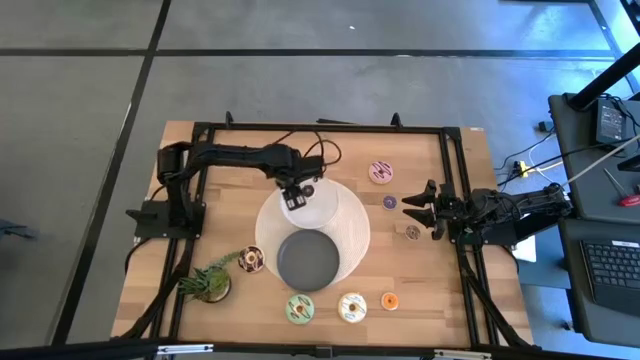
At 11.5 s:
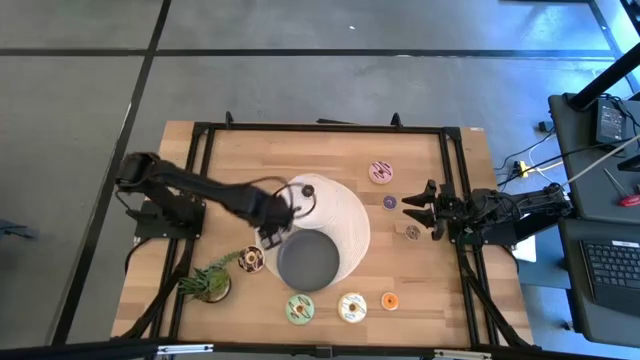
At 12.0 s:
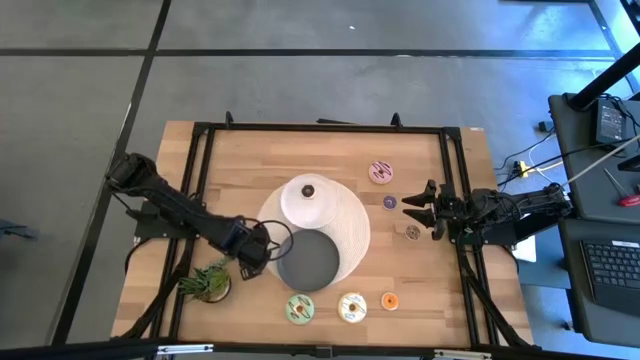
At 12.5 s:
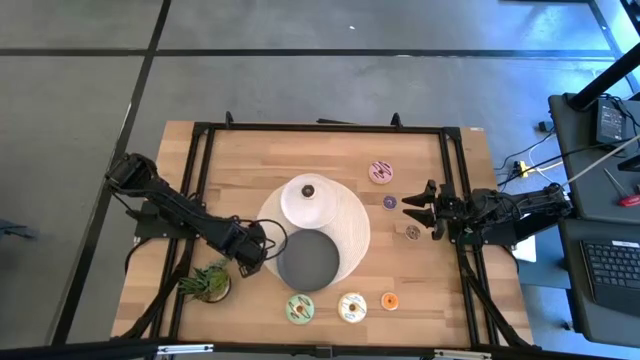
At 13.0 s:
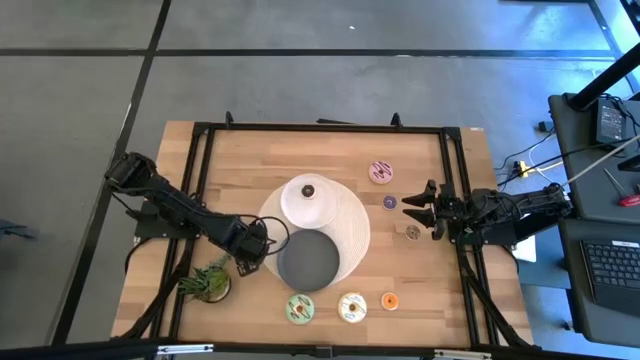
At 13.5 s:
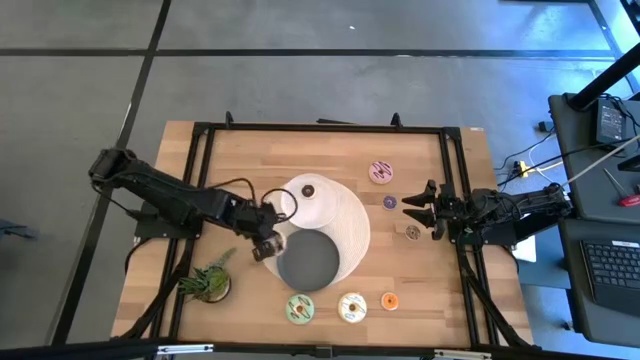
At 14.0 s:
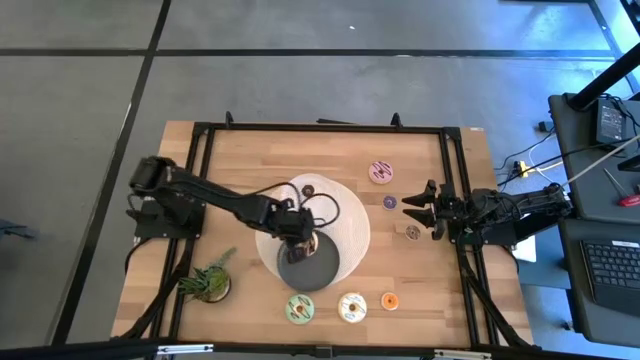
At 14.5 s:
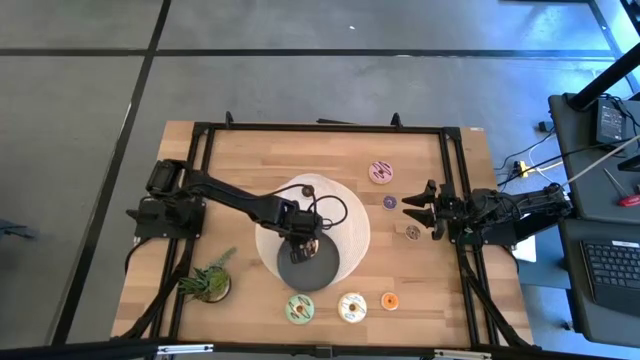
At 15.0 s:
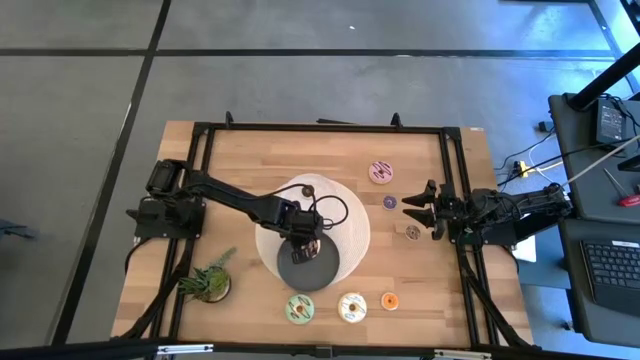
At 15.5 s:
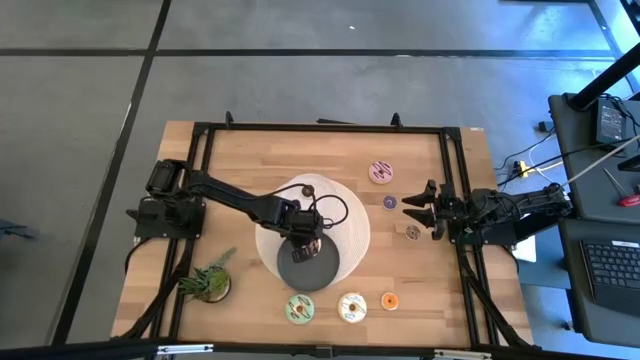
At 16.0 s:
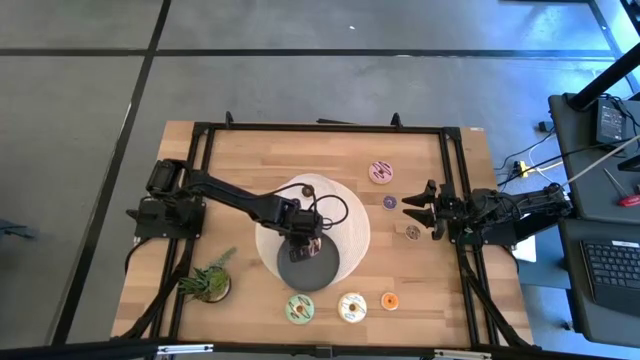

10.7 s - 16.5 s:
Task: Pick & Place donuts
Put the large black donut on the black plate

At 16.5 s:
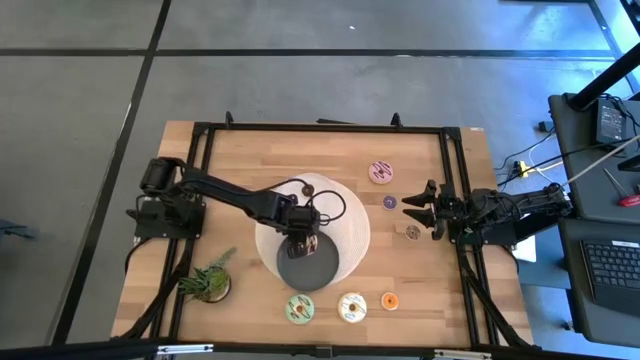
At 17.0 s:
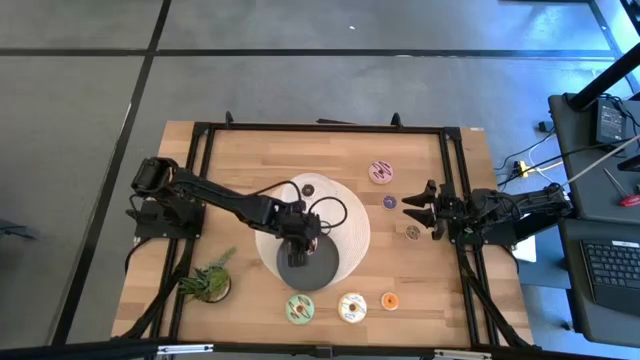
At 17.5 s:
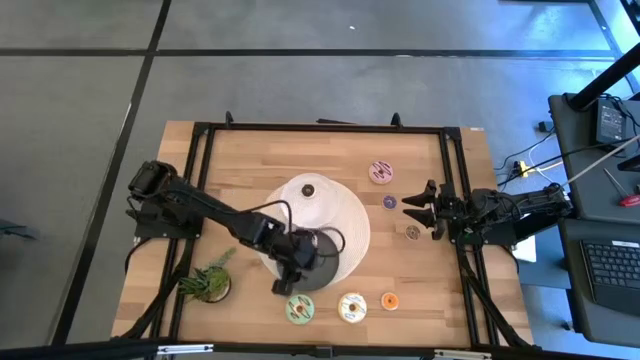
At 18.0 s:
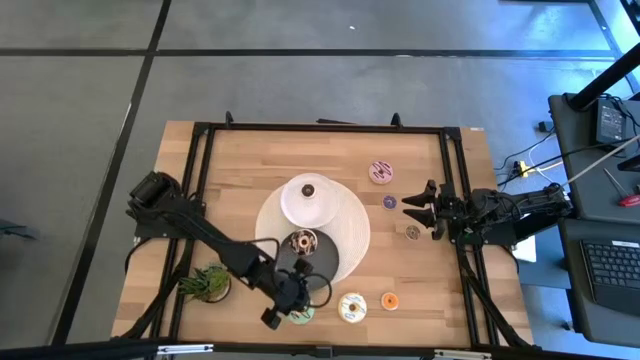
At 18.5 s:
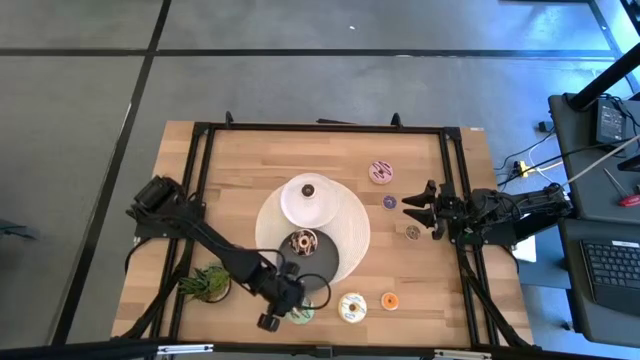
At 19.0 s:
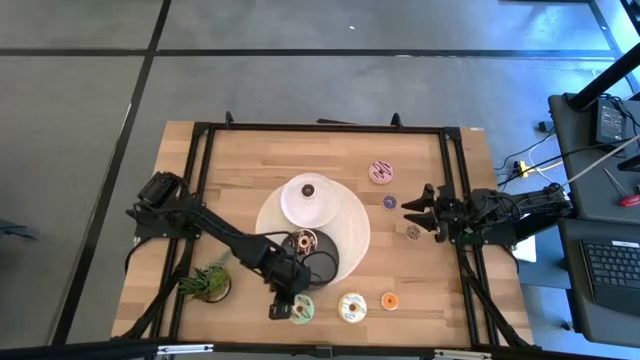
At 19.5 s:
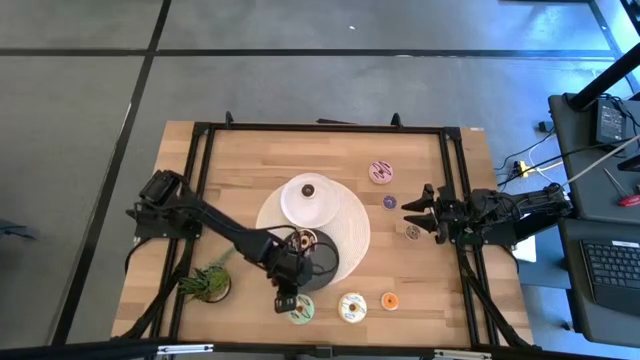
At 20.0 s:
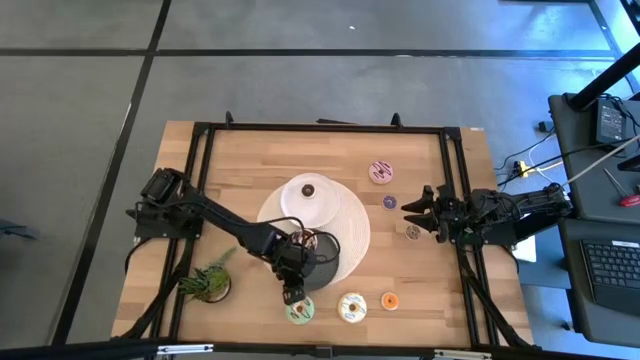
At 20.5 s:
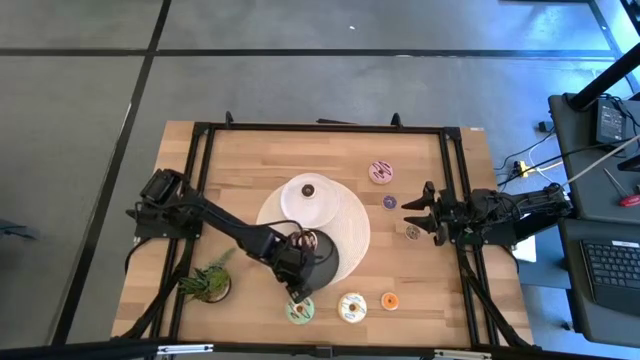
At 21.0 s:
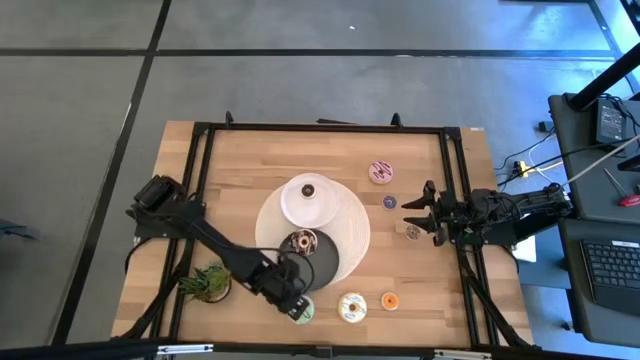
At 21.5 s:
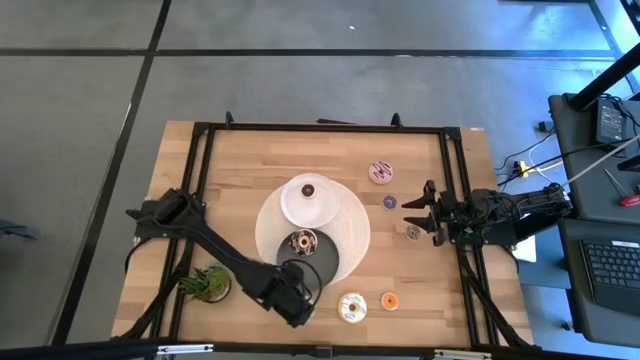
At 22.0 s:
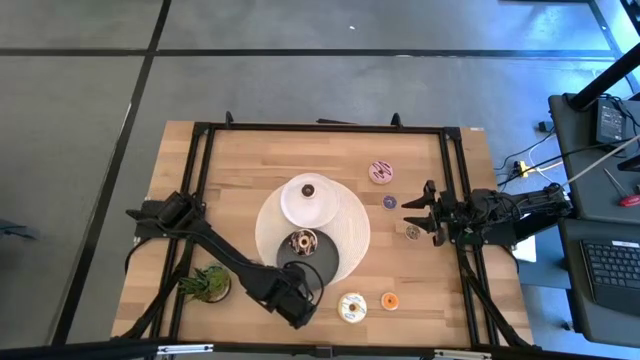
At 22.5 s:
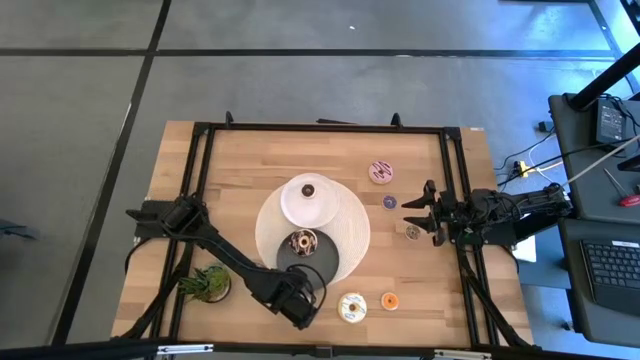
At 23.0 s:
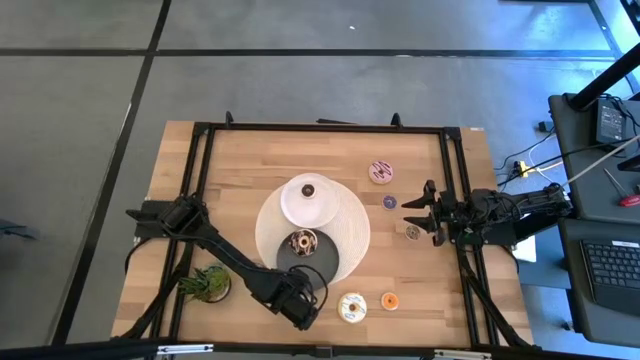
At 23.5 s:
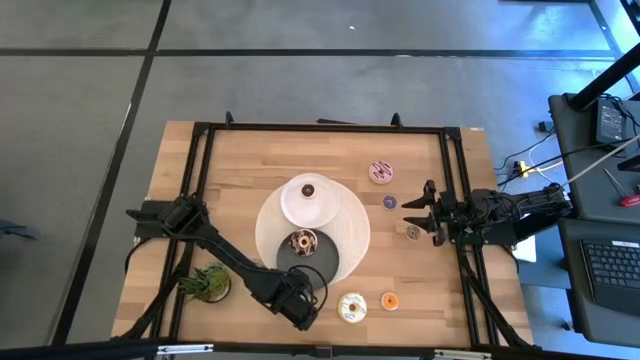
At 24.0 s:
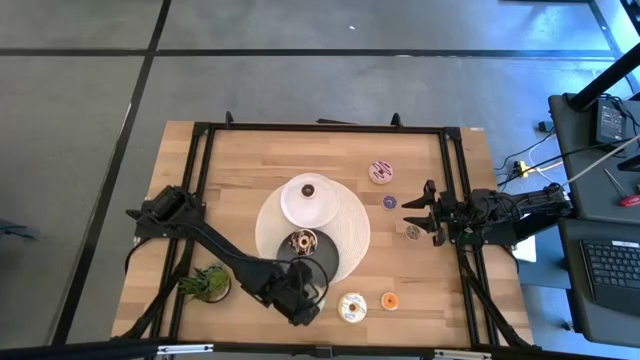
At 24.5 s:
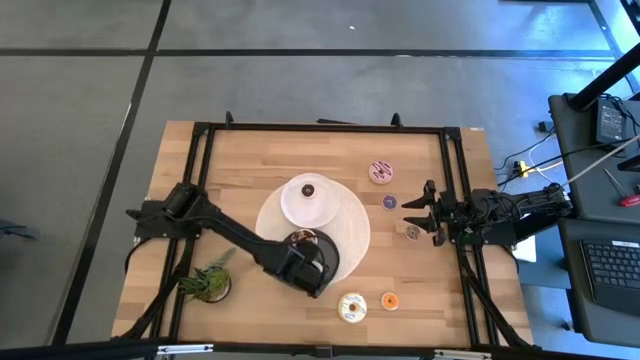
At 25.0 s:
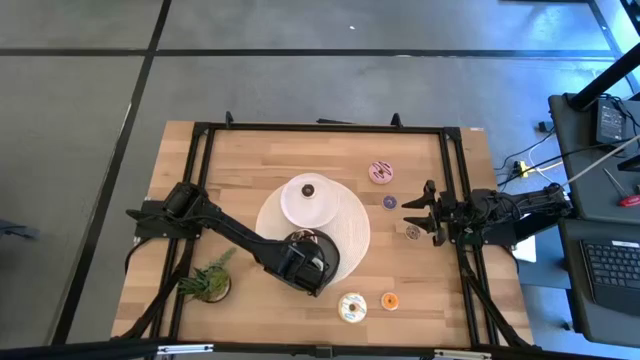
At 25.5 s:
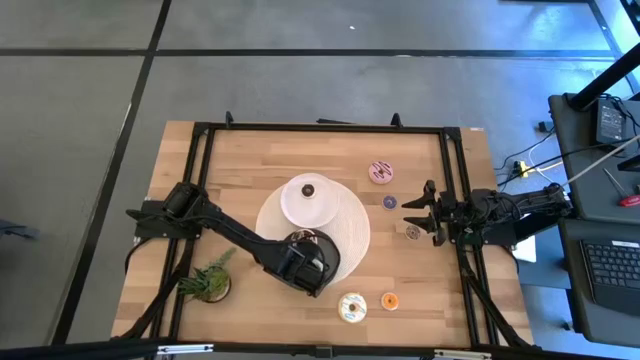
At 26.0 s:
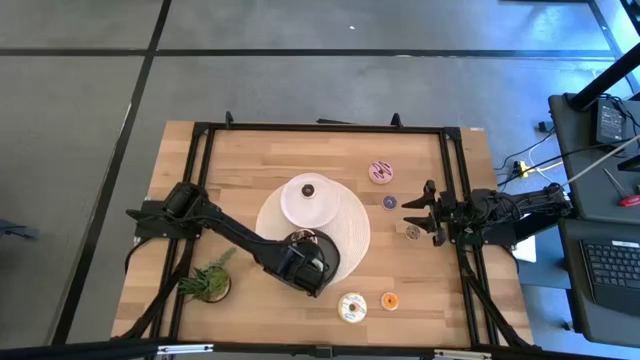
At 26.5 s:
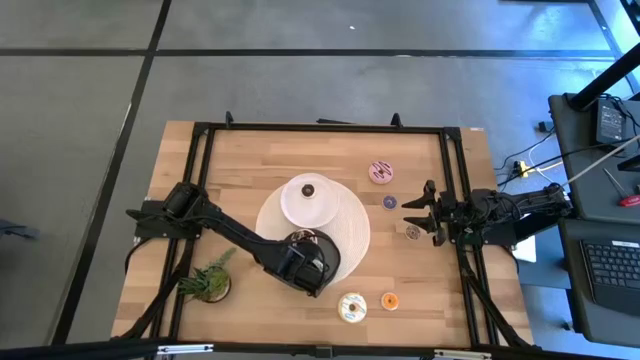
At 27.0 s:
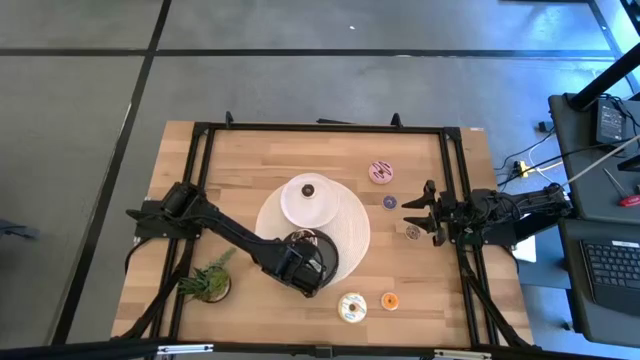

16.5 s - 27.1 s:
Put the large green donut on the black plate

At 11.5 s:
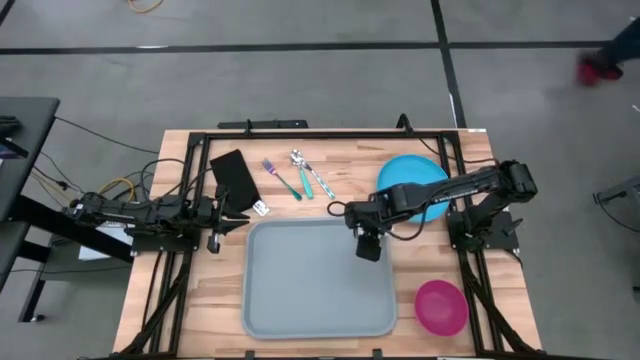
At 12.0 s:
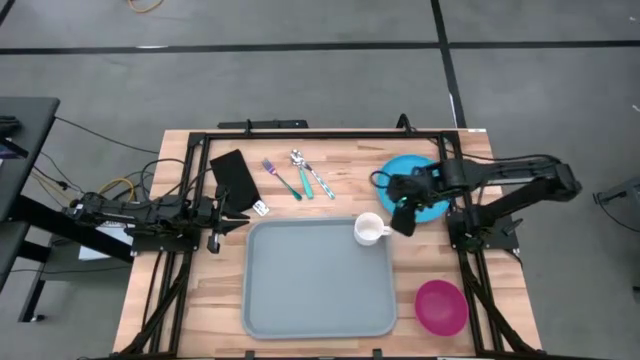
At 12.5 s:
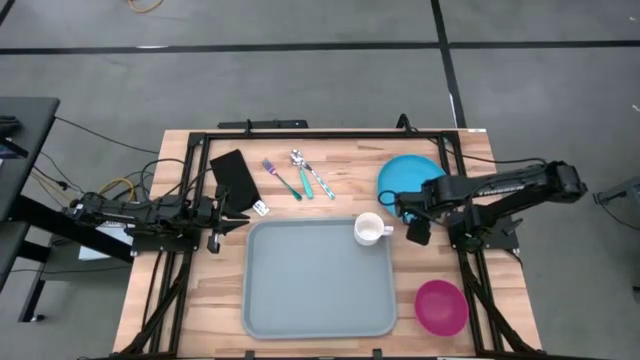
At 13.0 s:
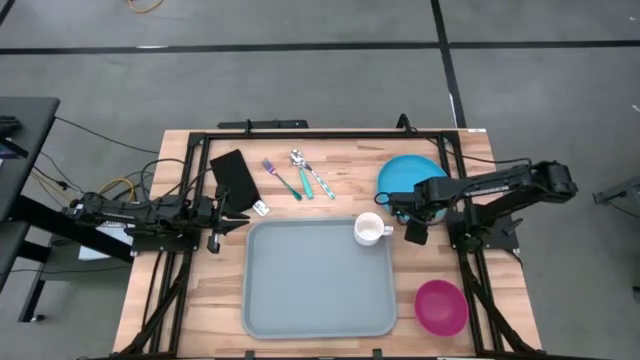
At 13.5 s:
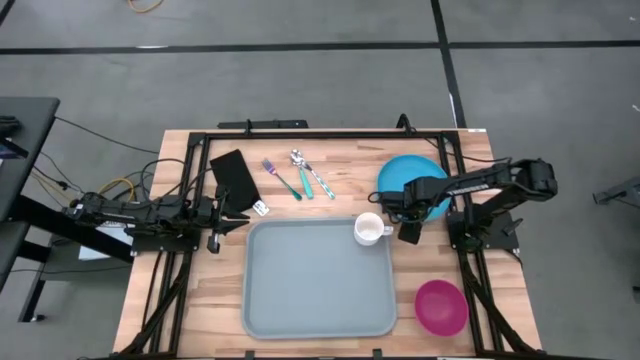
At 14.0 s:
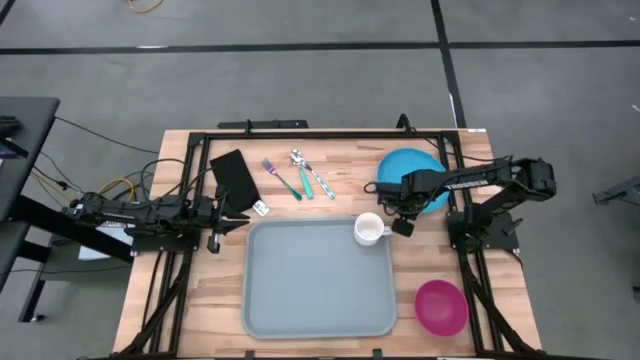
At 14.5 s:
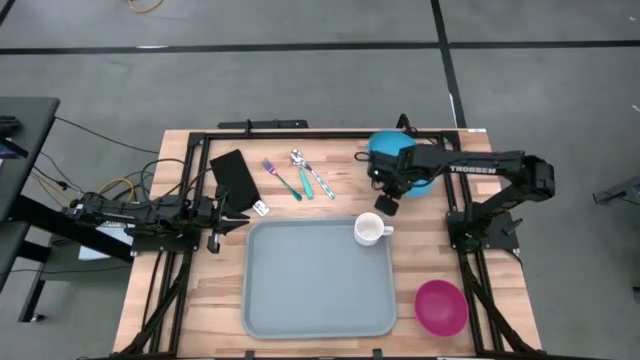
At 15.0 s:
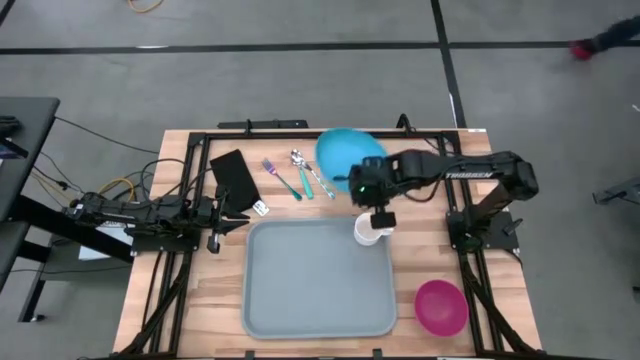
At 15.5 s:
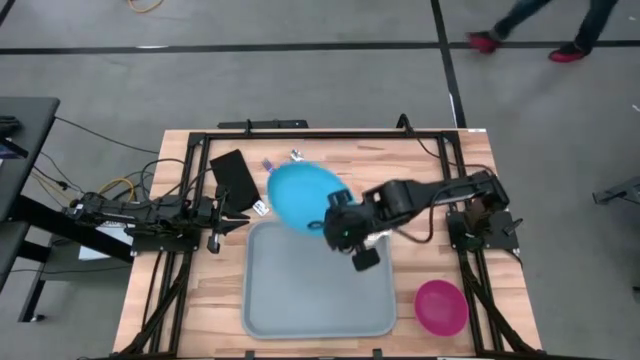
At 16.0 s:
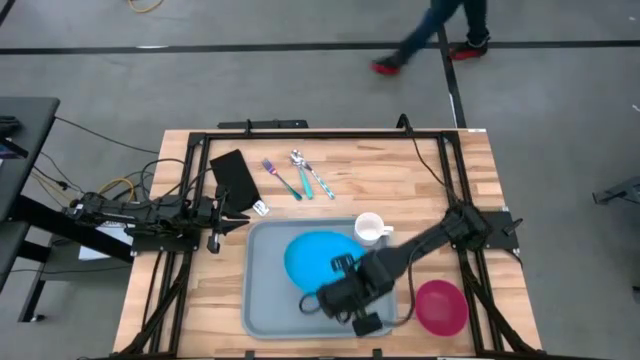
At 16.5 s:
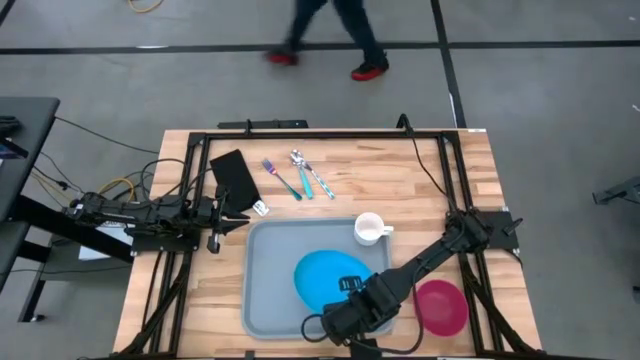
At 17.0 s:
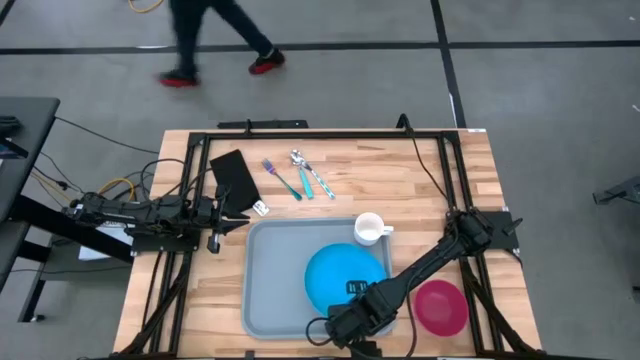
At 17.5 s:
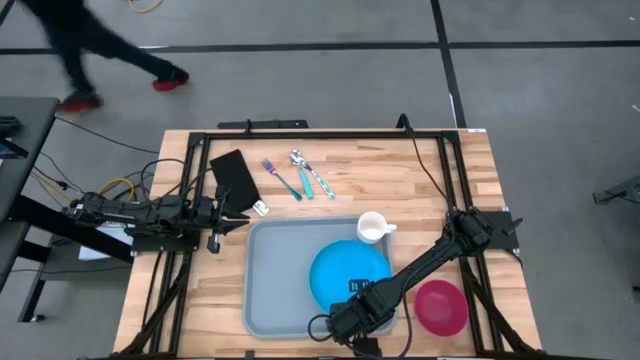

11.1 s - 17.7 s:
Task: Set up tray
Put the blue plate on the gray serving tray to the bottom of the white mug
